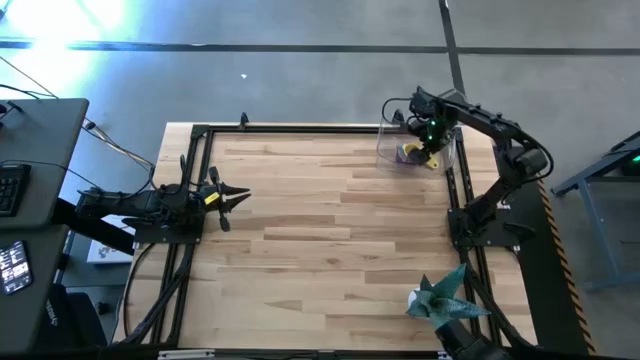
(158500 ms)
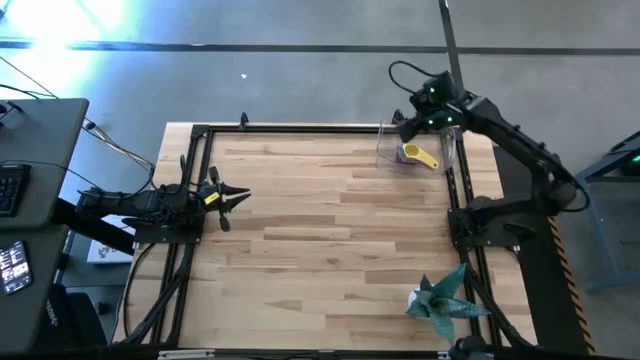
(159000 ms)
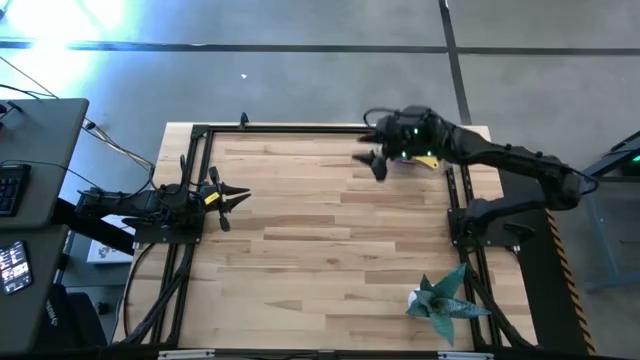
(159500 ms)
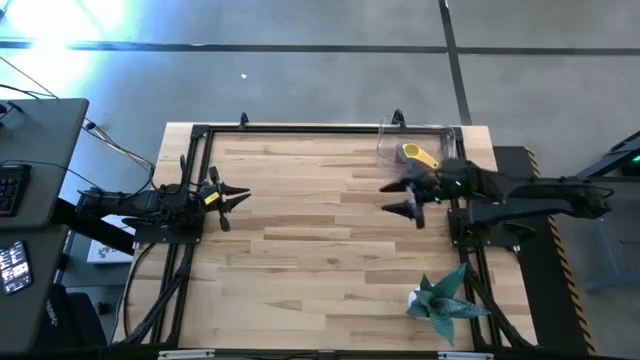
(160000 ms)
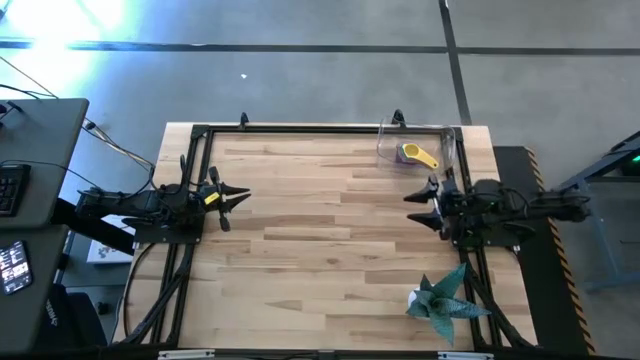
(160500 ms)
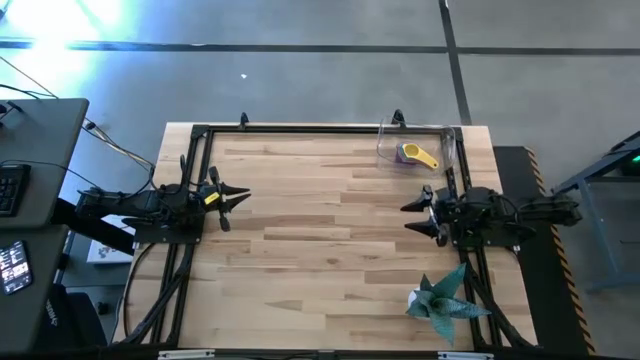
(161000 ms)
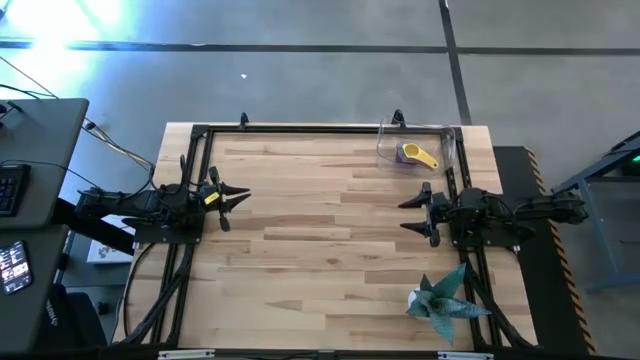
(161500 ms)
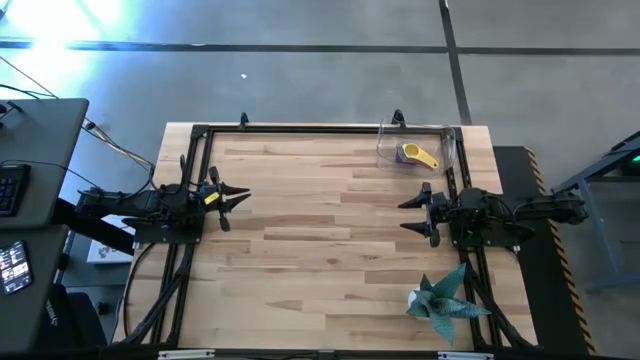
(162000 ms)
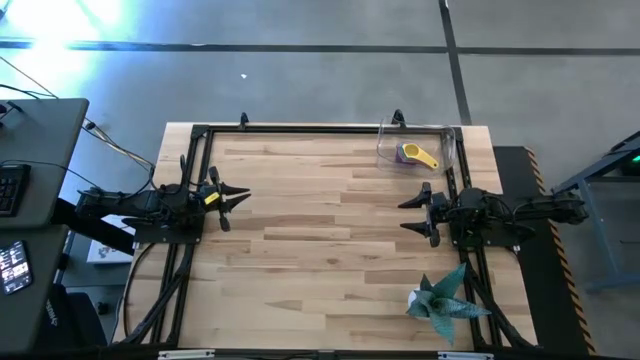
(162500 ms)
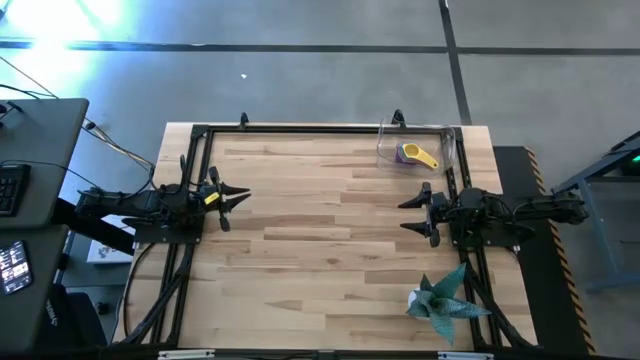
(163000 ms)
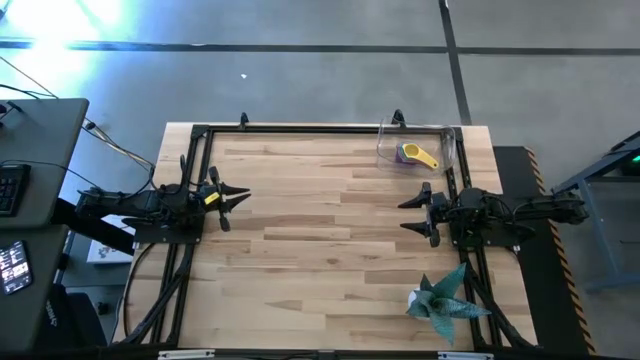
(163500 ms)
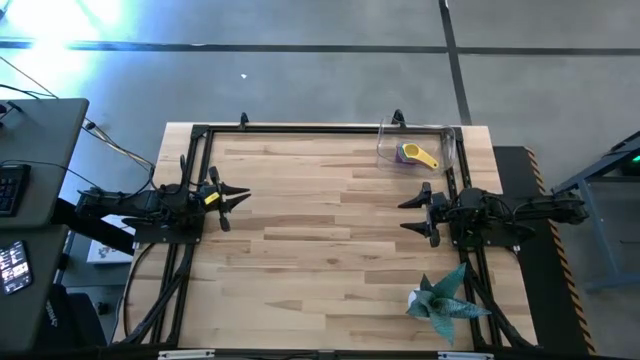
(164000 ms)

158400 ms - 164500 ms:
Task: Nest measuring cups in basket
Return to Home Position

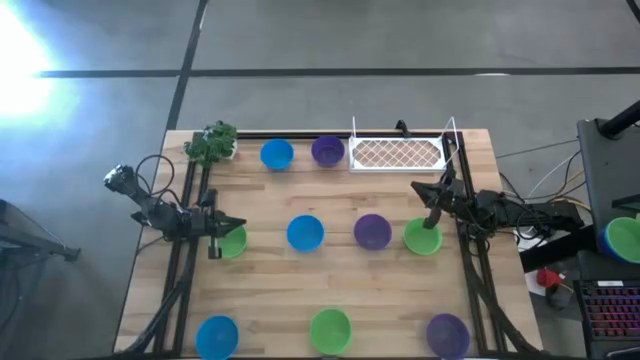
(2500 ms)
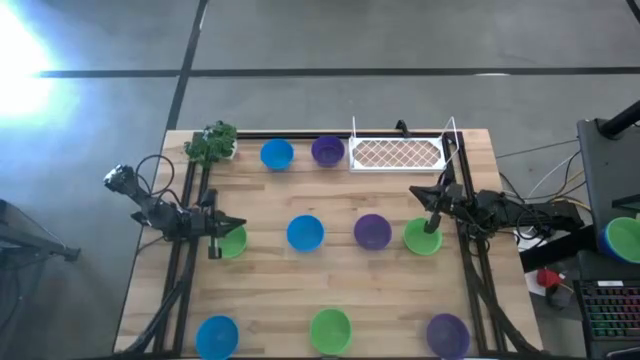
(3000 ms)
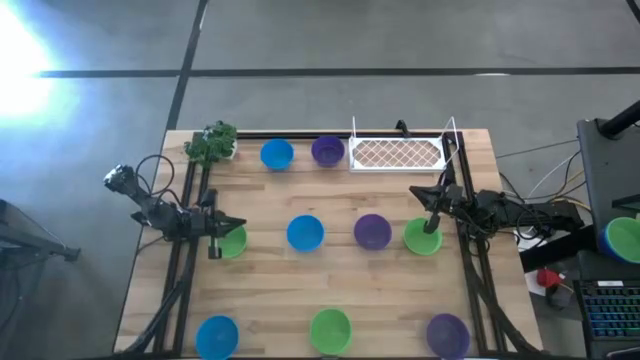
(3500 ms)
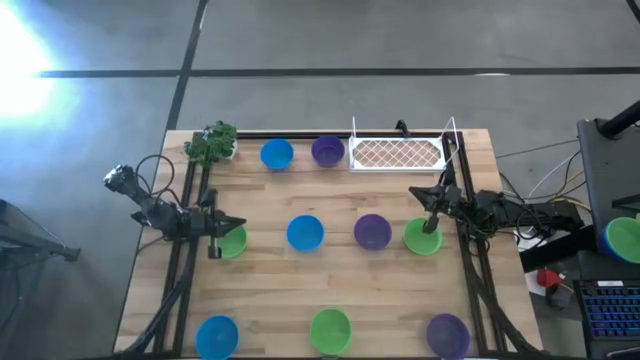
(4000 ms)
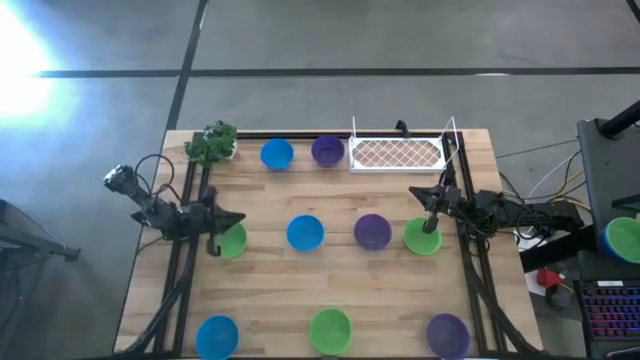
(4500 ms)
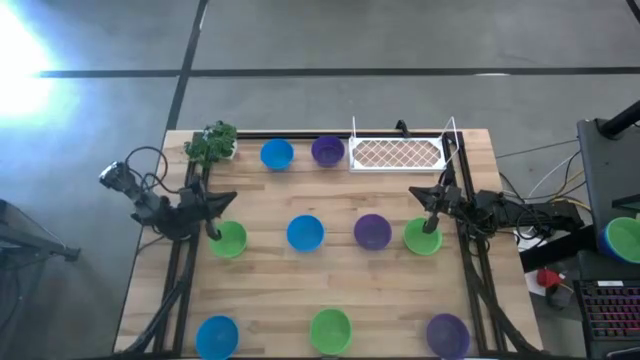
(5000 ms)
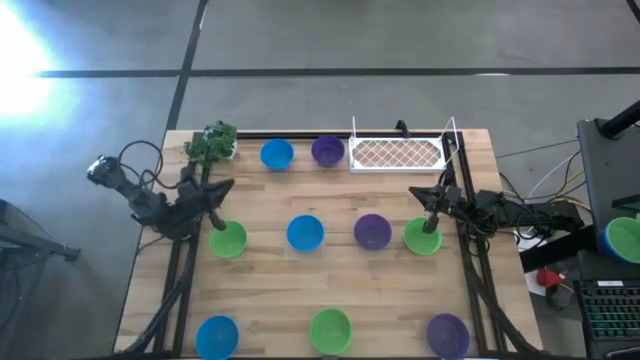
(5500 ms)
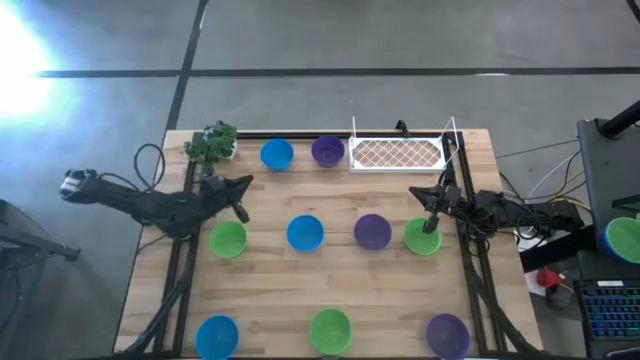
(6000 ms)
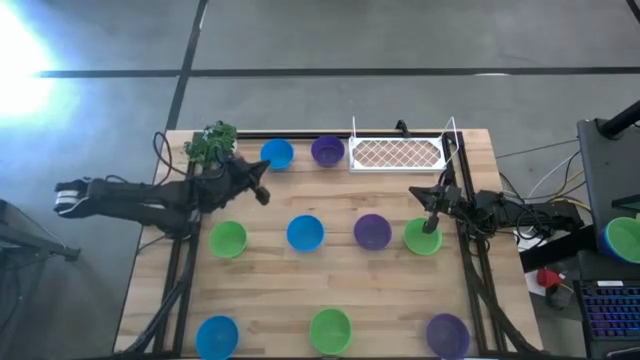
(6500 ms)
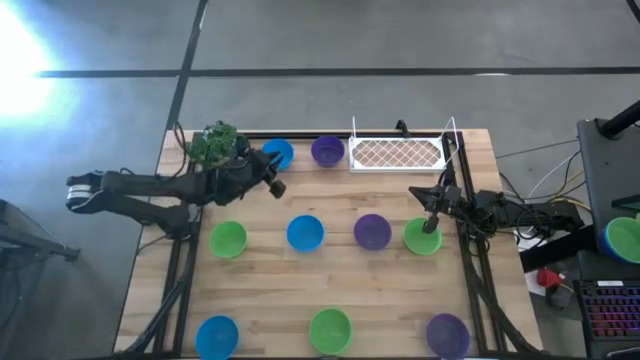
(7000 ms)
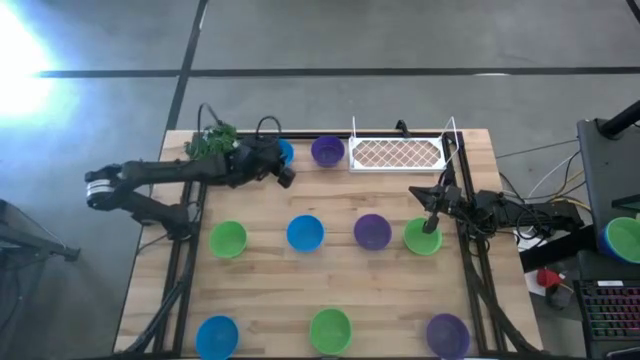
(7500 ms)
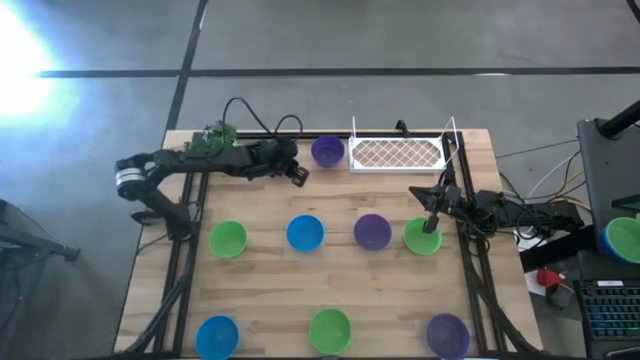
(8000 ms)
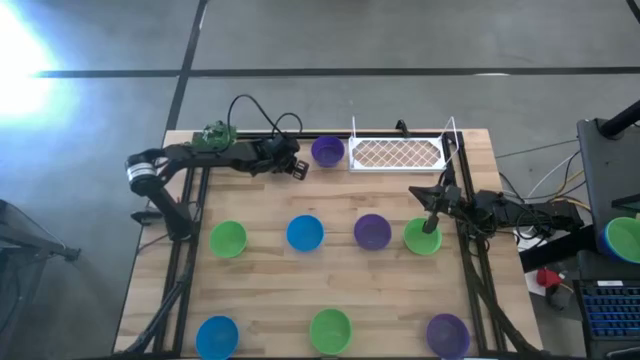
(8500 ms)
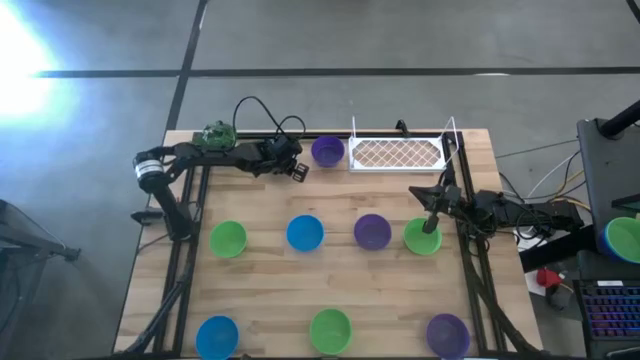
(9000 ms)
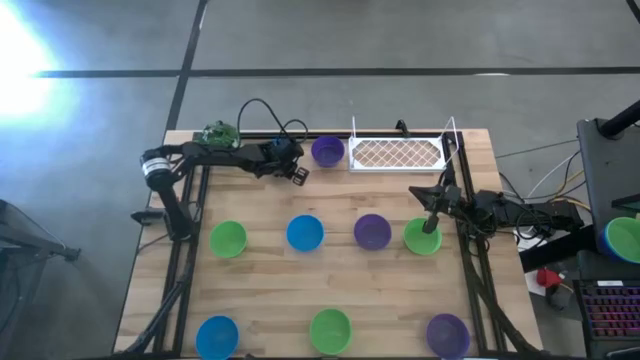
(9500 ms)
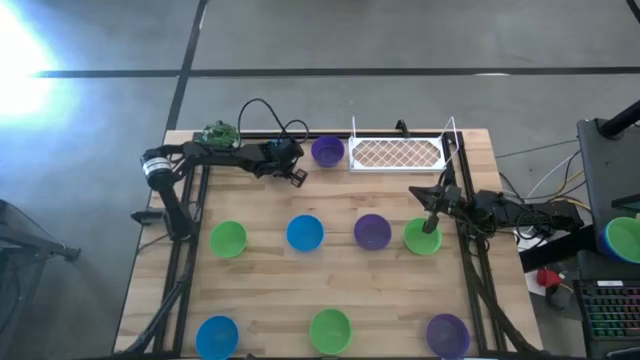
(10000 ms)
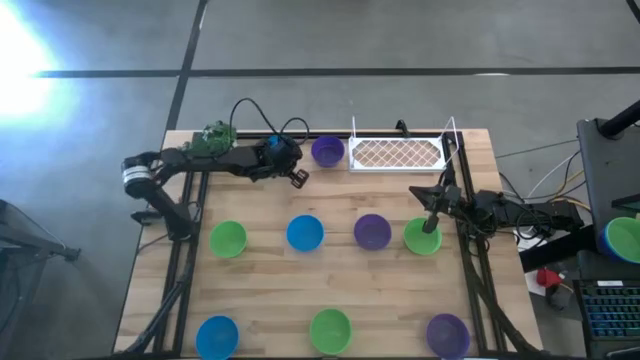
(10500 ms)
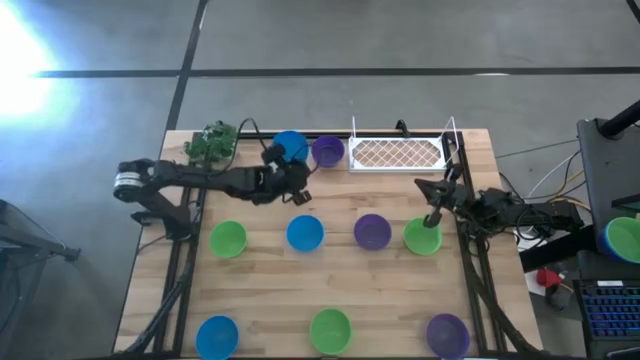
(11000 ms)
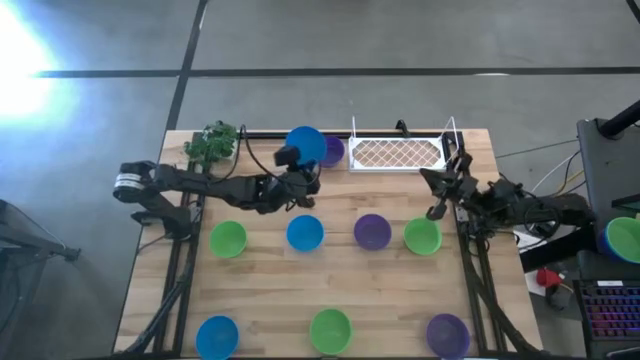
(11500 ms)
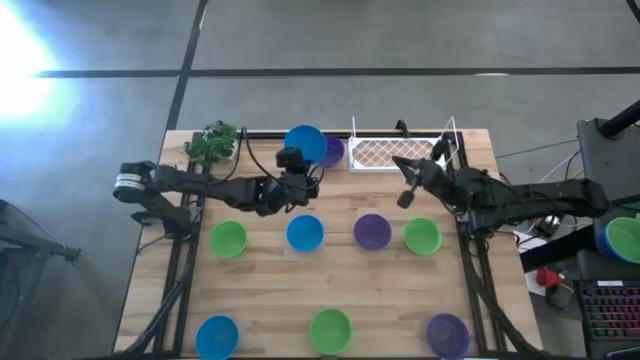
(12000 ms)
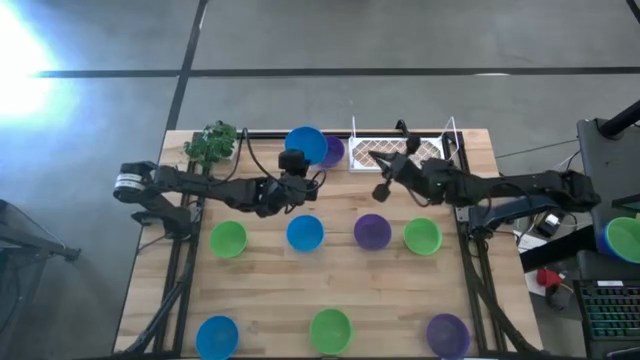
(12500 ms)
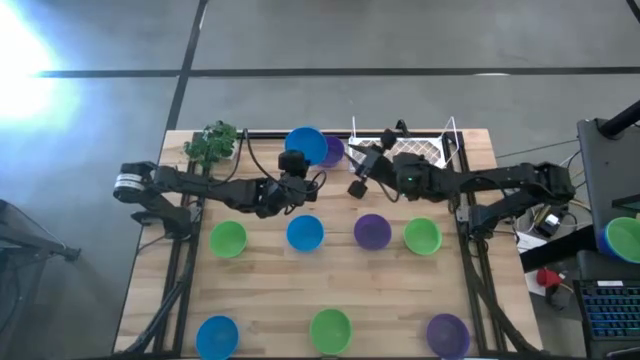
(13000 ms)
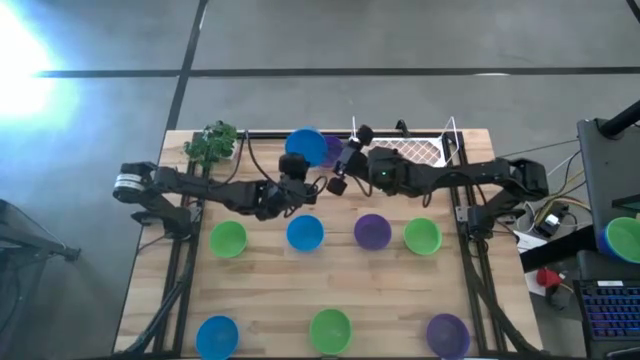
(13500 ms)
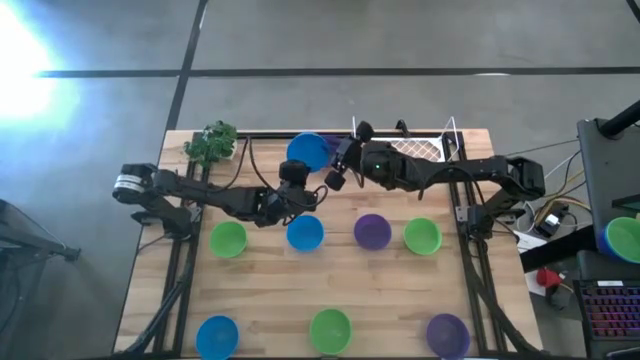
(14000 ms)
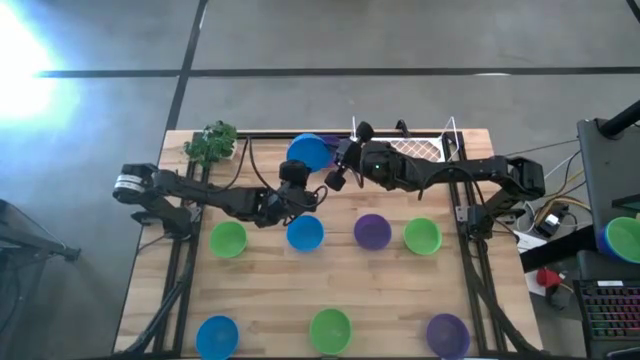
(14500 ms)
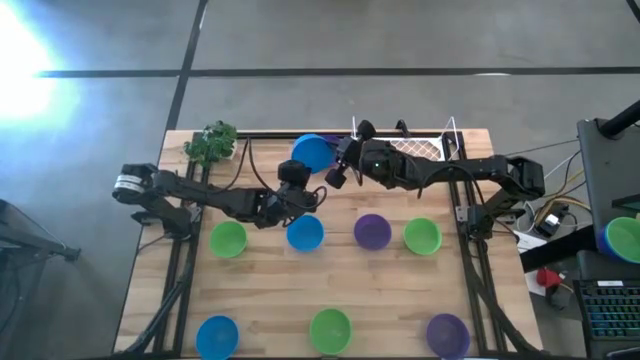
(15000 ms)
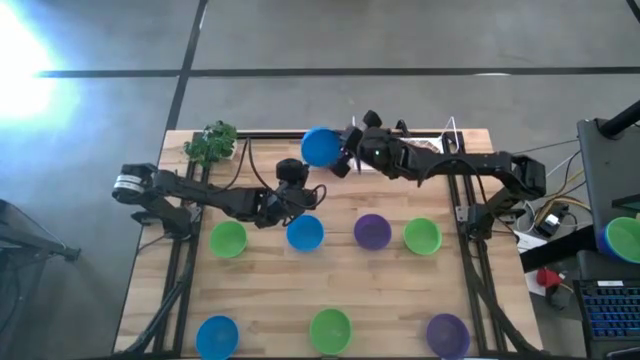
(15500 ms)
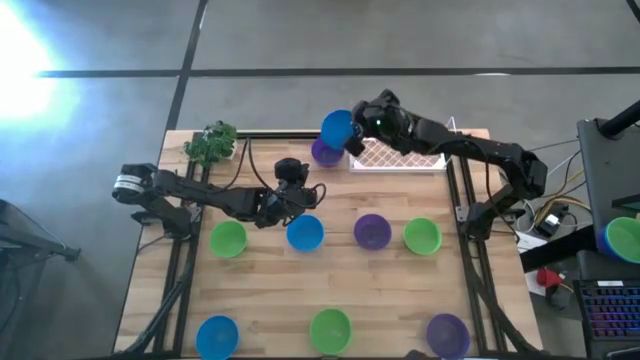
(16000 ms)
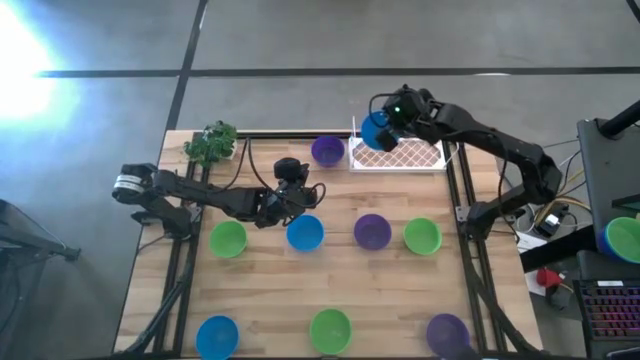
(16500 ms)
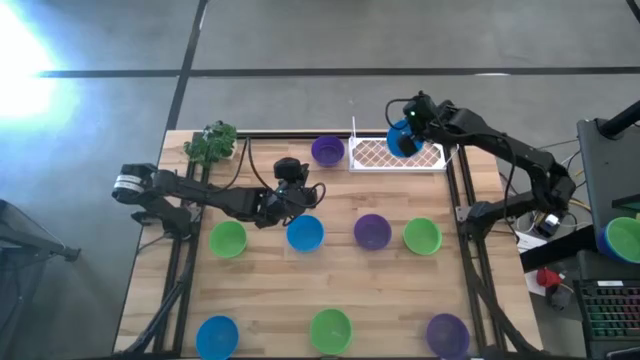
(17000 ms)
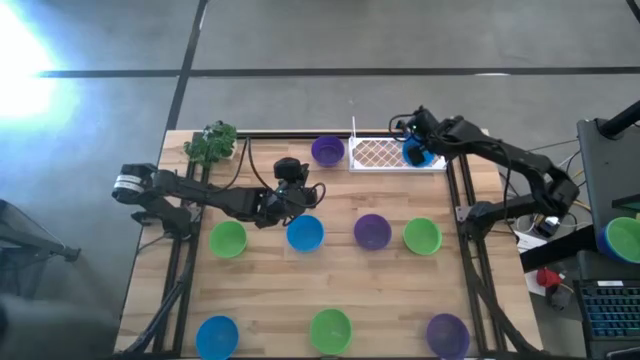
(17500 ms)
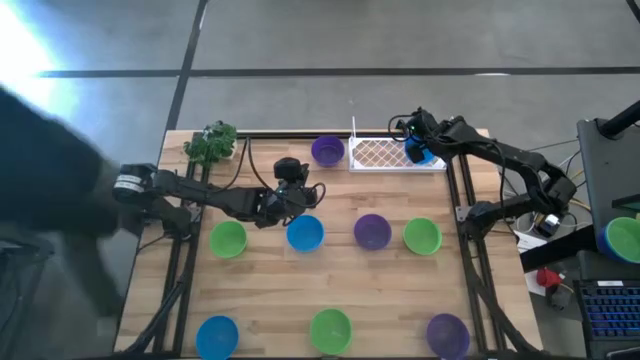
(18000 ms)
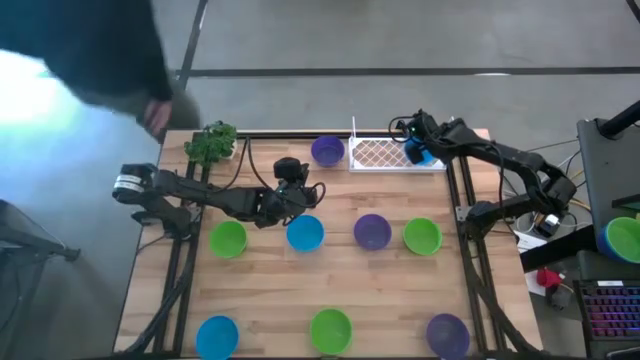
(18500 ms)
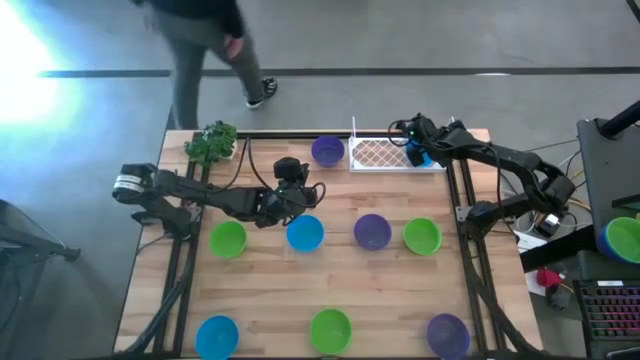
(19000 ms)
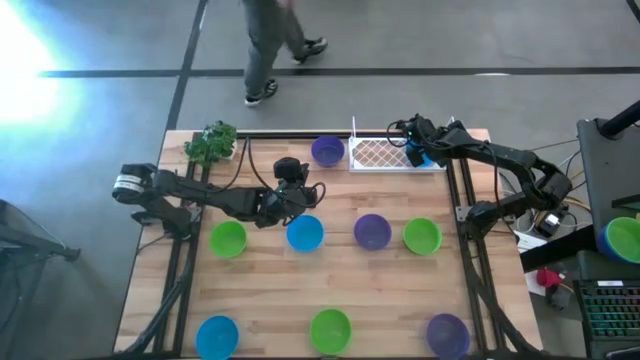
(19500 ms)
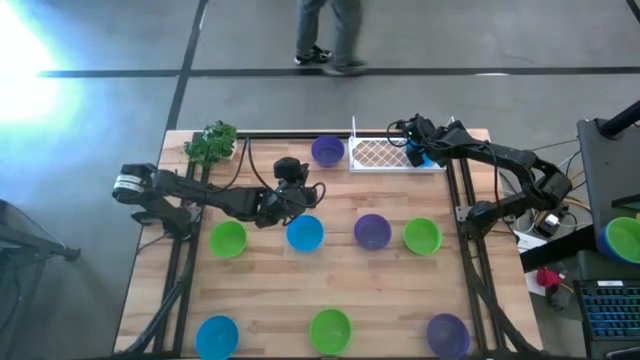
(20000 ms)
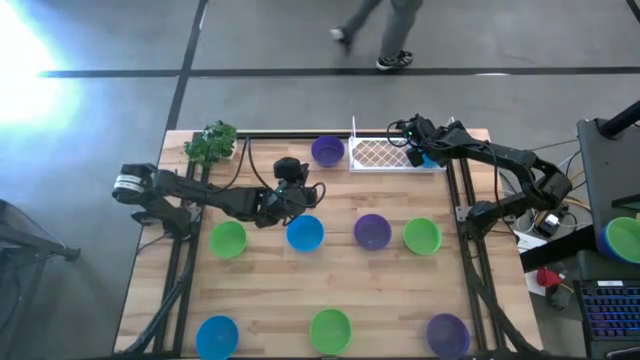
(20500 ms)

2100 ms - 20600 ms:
Task: Pick & Place Mini bowls
Put the top blue bowl on the shelf
